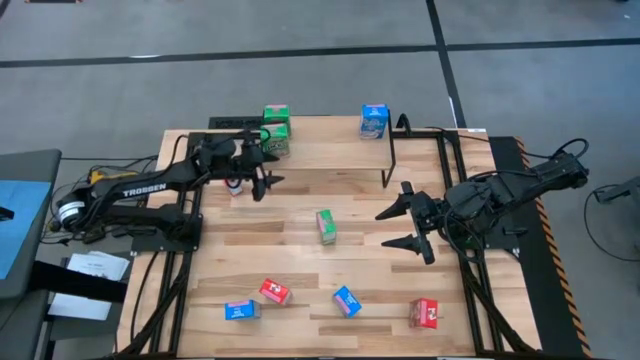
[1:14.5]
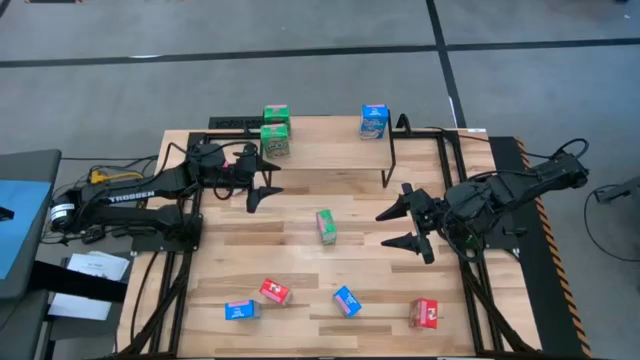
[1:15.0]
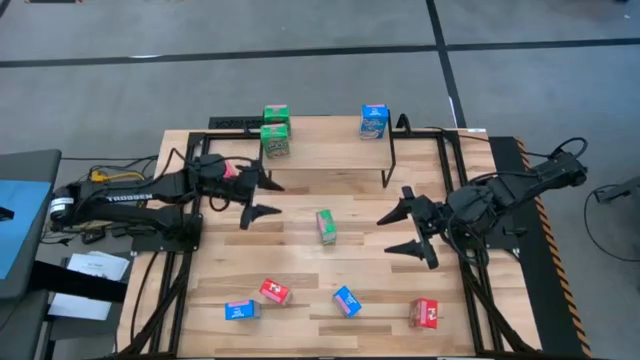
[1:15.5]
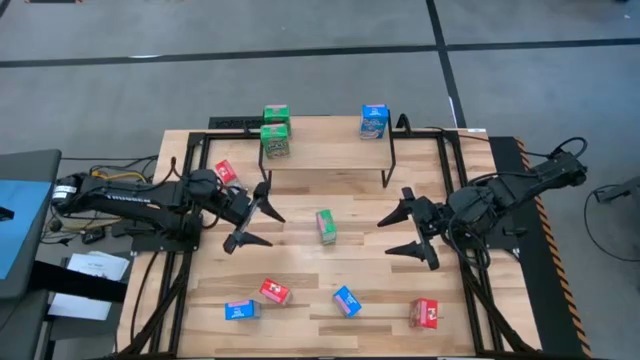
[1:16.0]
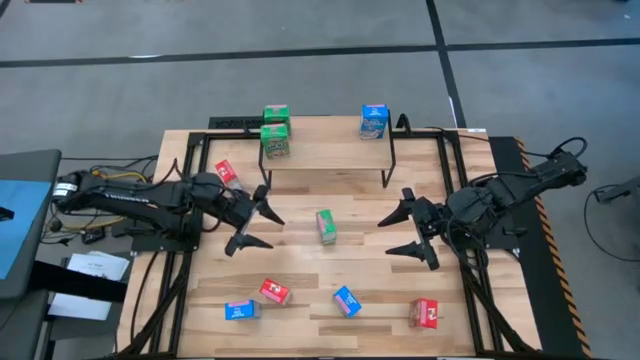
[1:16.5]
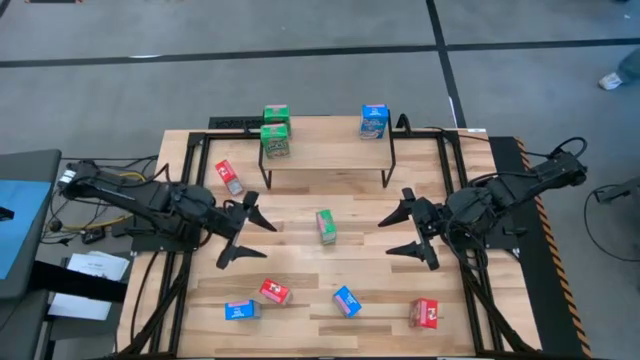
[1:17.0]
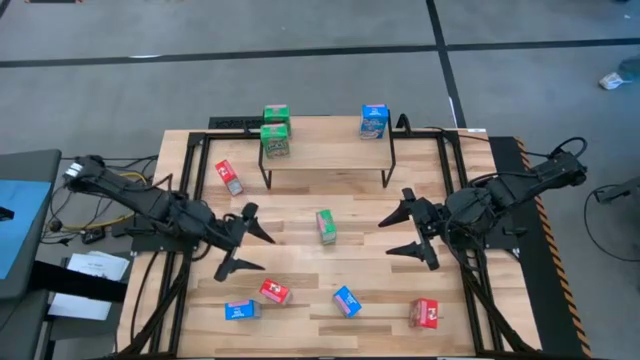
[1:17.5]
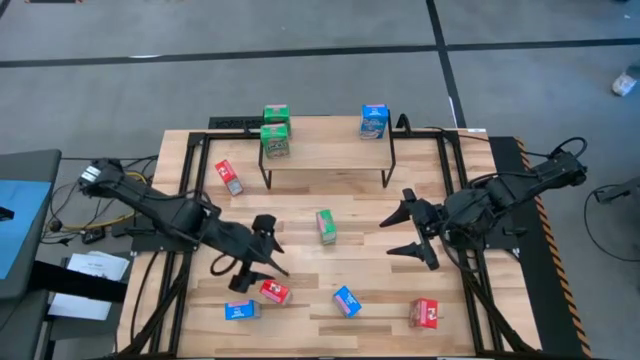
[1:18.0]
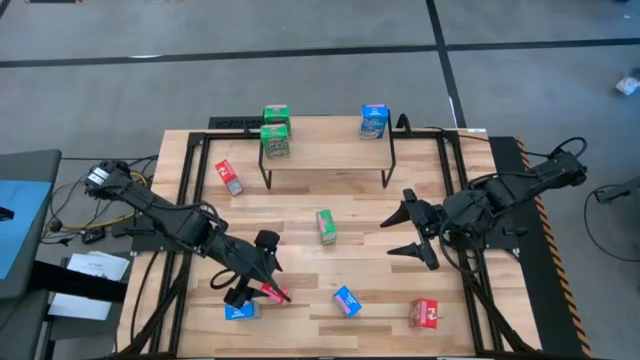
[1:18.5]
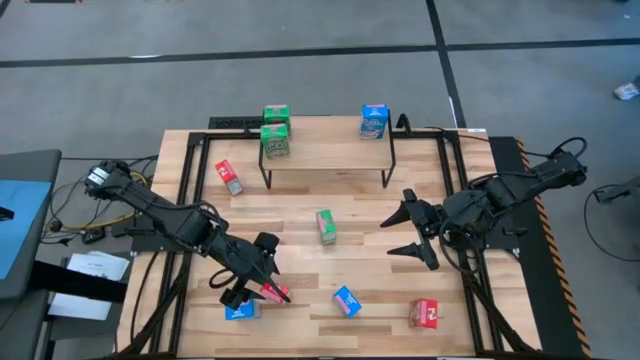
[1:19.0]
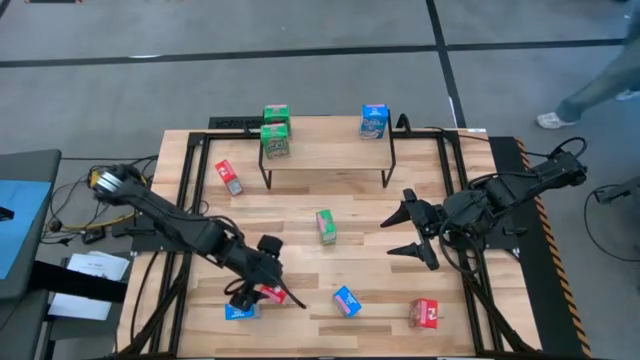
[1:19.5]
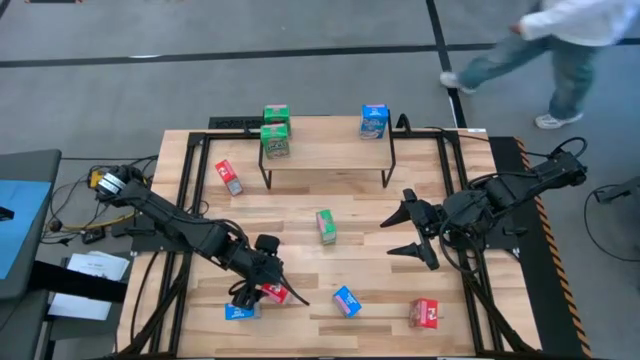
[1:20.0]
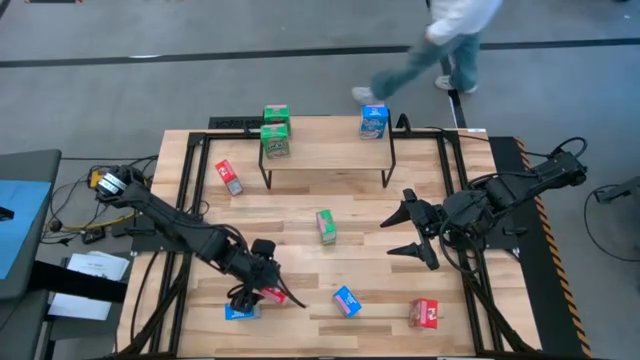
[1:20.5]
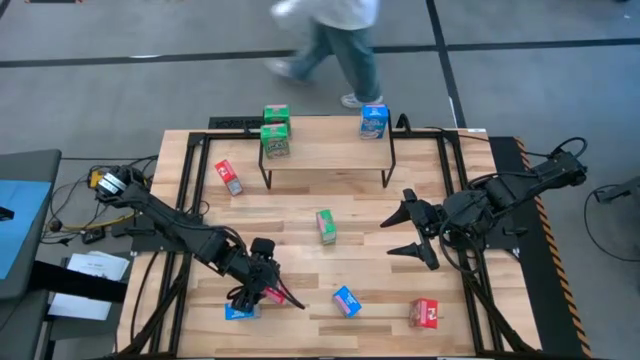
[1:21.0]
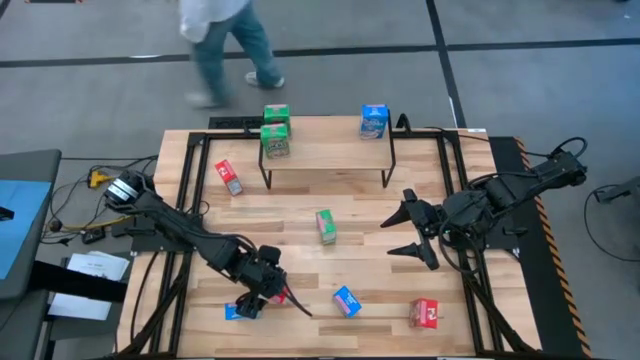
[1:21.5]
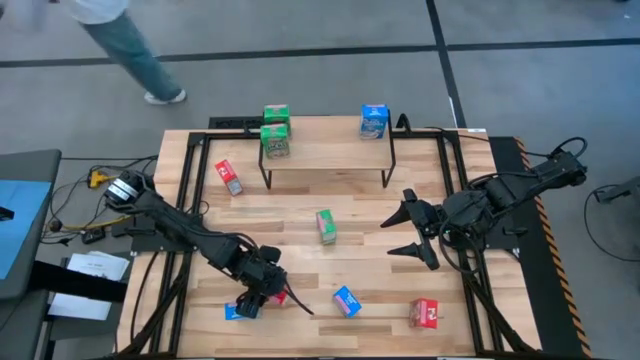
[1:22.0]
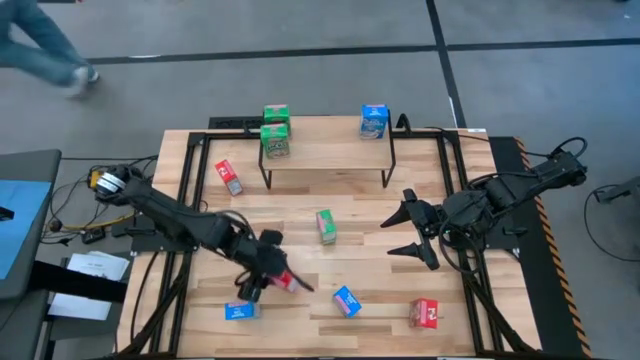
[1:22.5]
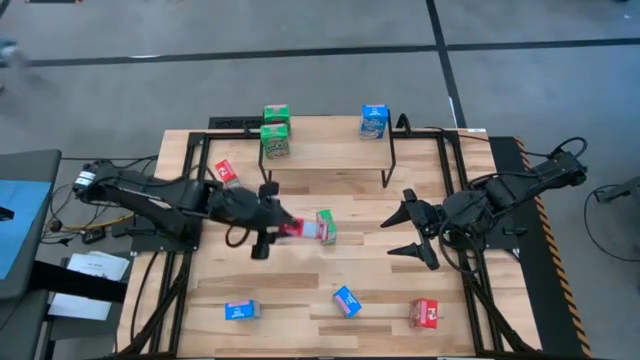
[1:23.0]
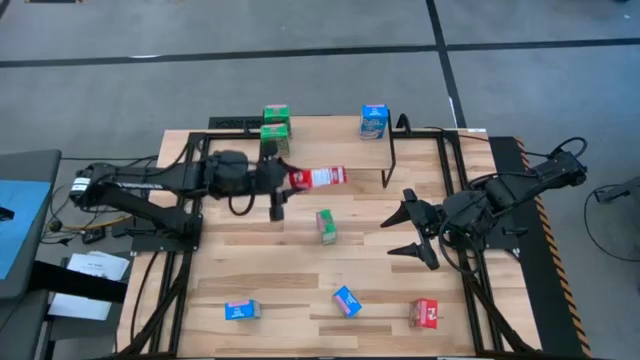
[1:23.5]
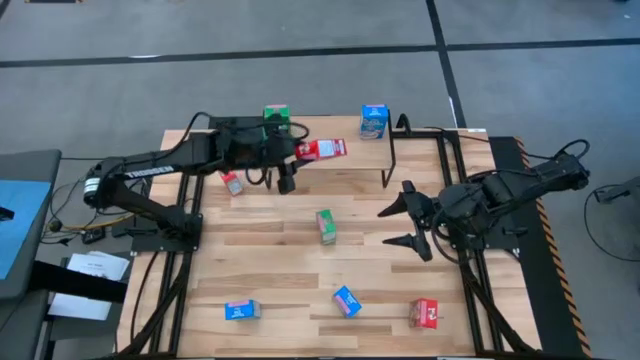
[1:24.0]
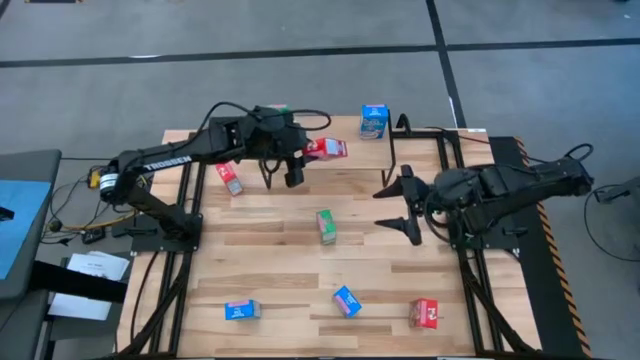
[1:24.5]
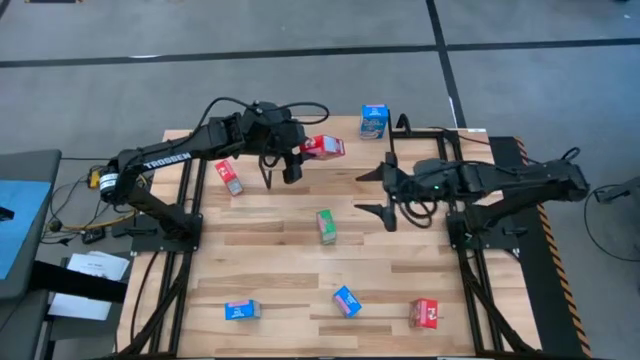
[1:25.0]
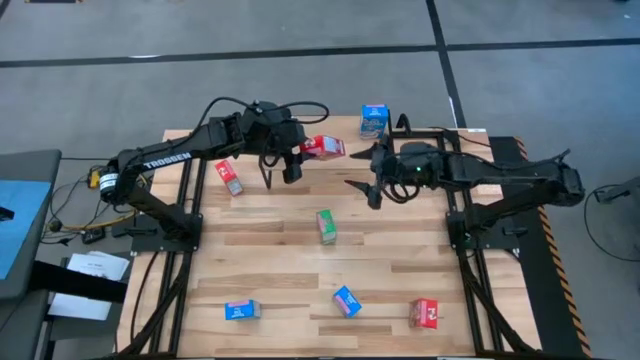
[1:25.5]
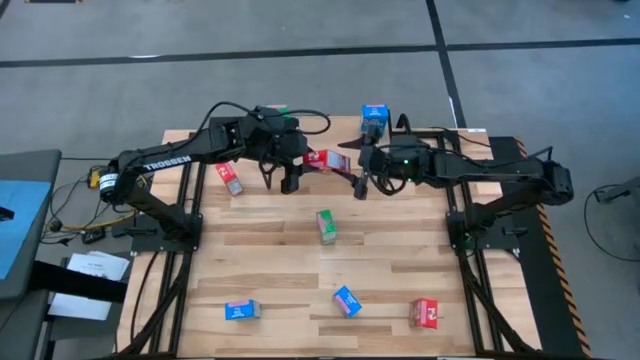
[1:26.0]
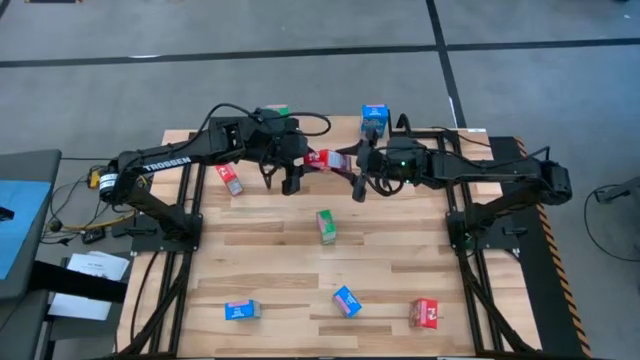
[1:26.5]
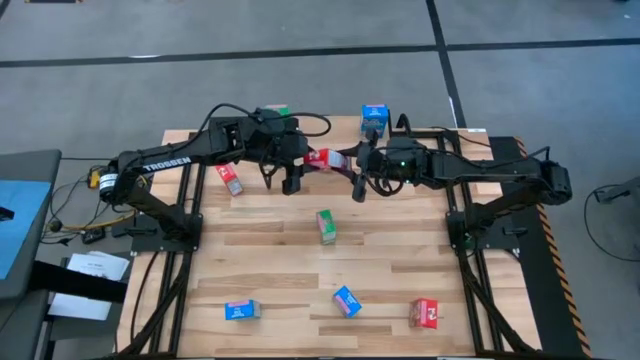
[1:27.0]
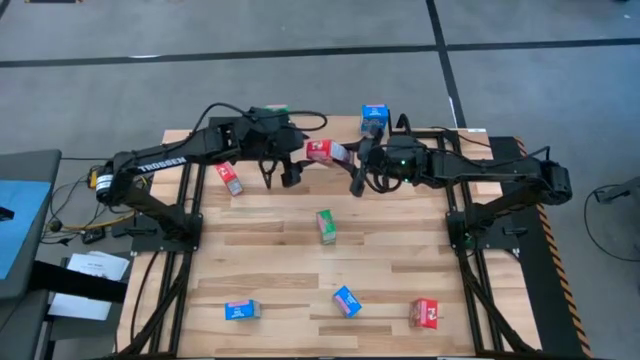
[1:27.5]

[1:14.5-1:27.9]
Task: Stack cereal on shelf
Put the bottom left red cereal box on the shelf

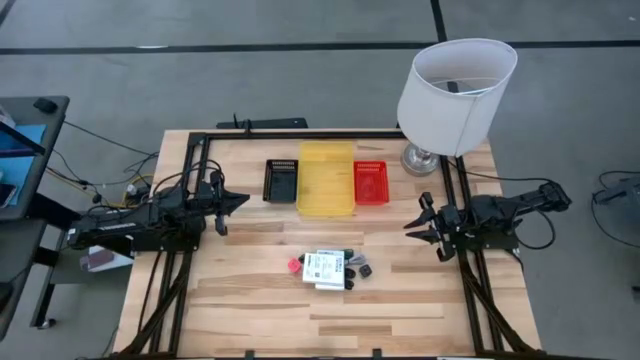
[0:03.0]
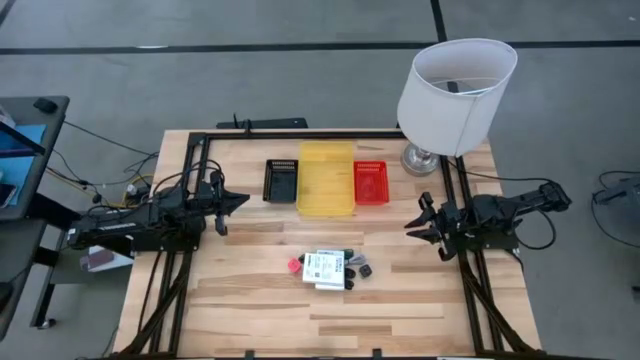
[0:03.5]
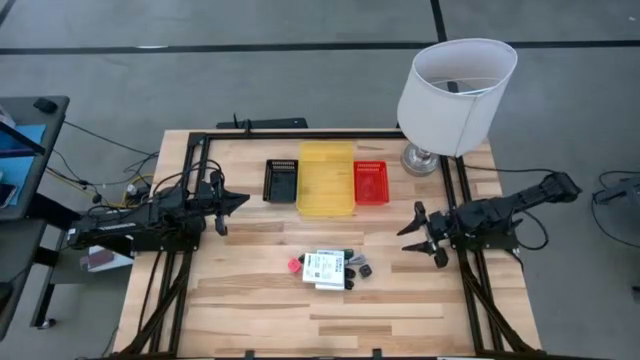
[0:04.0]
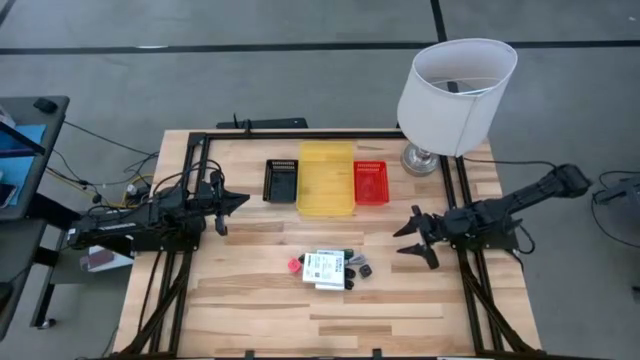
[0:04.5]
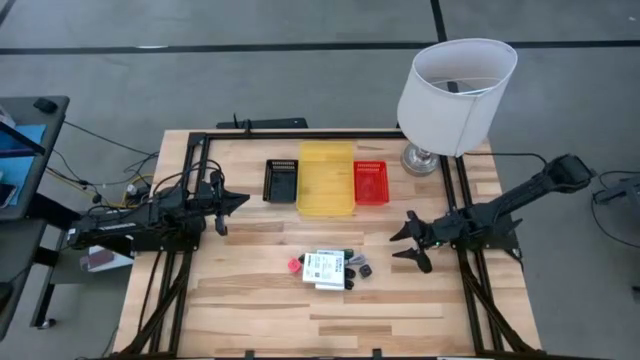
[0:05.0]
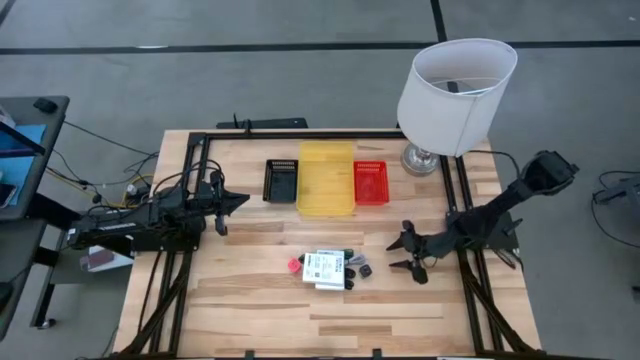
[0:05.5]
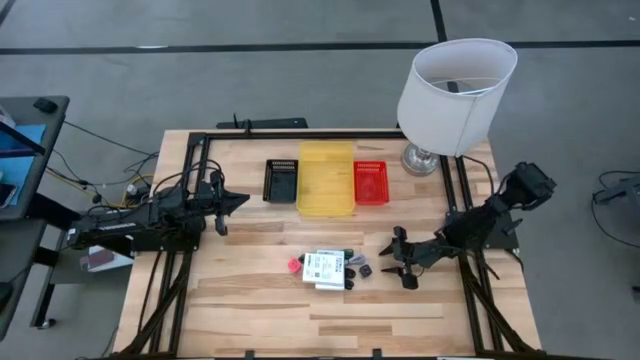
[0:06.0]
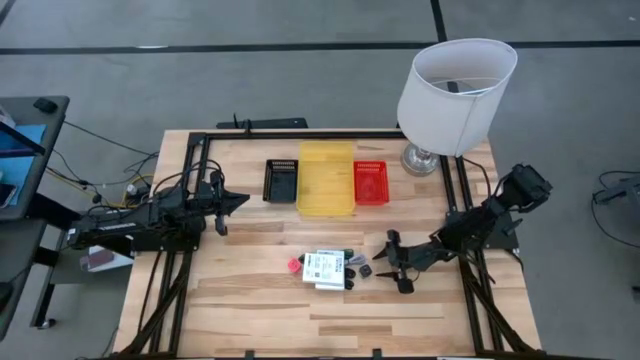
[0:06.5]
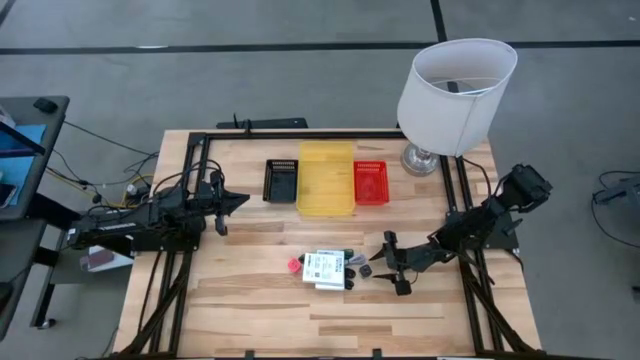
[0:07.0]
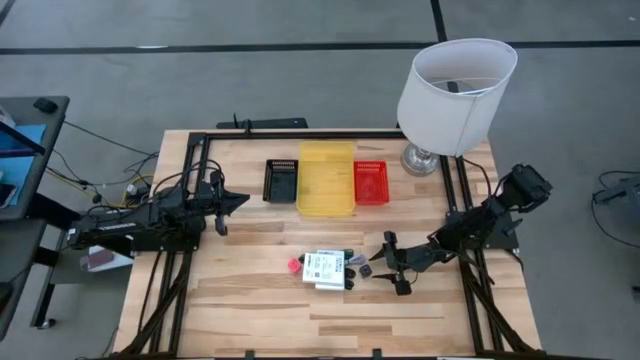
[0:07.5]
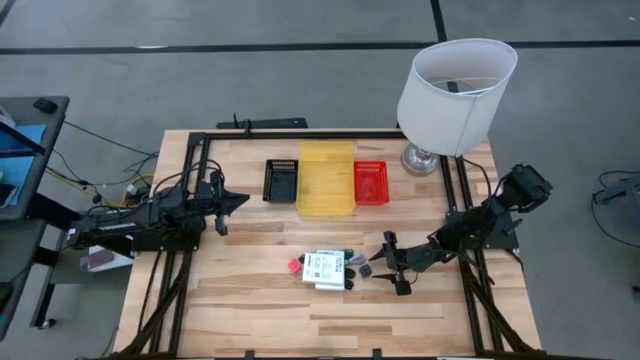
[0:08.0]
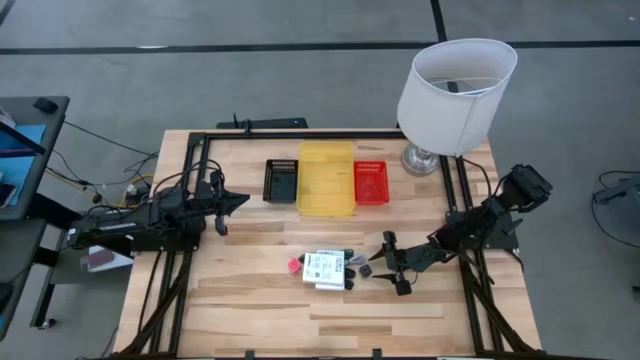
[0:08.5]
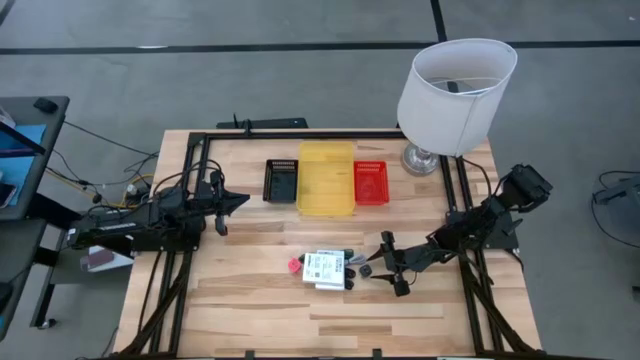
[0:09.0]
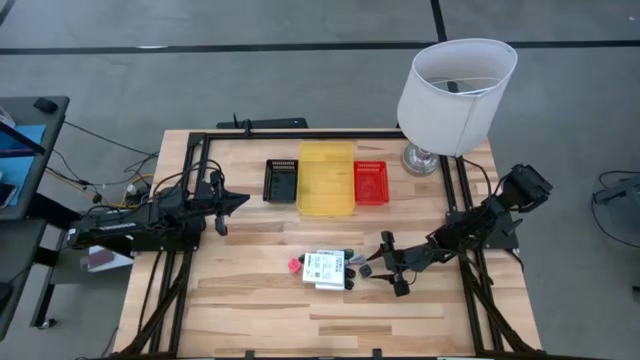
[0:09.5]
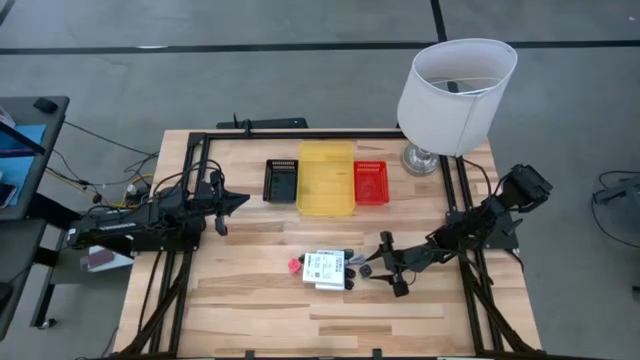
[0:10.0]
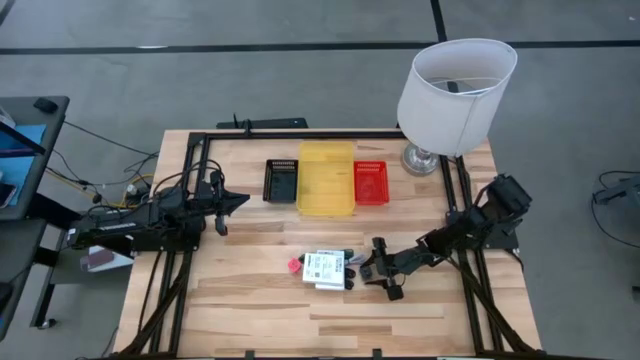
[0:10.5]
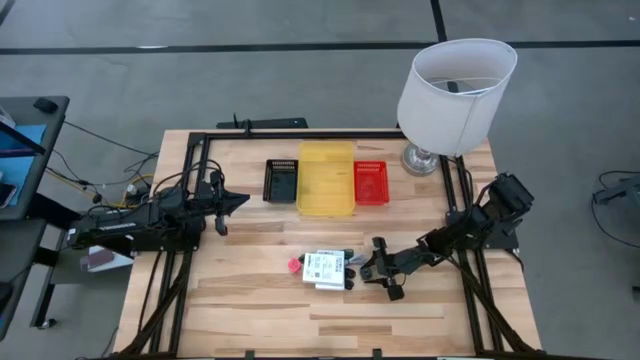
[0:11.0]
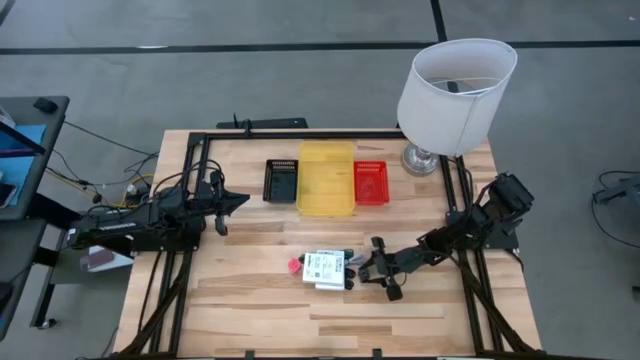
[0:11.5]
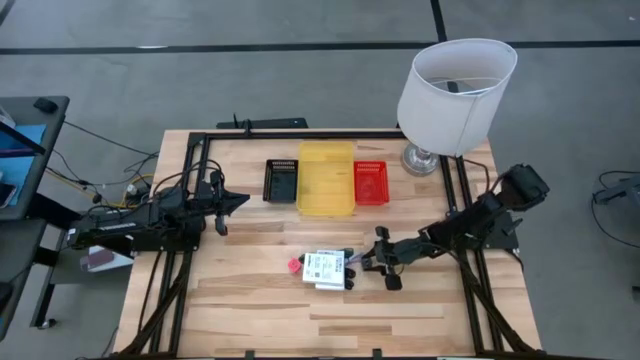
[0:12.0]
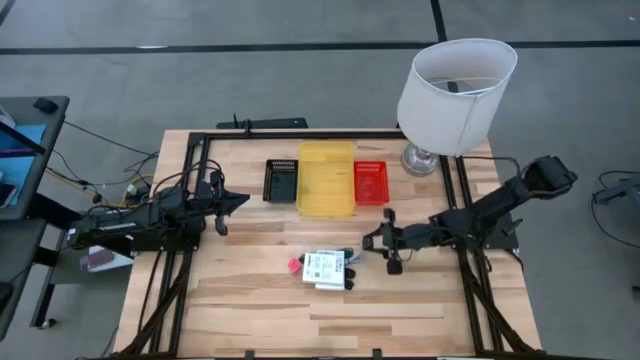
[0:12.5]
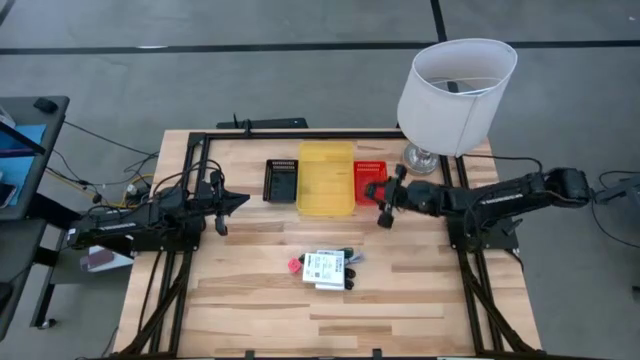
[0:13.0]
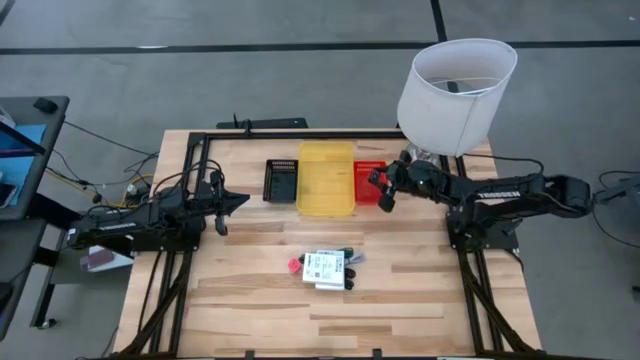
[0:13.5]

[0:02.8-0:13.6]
Task: Pick and place items into bin
Put the black charger adapter into the red bin
